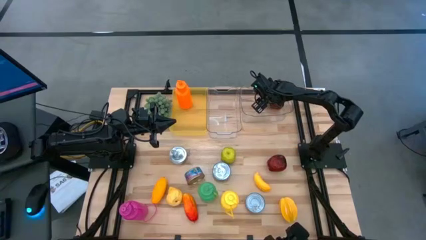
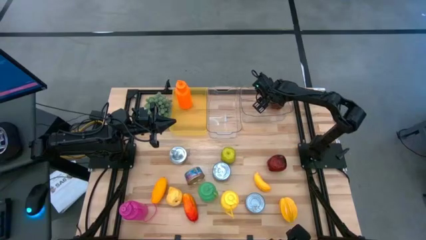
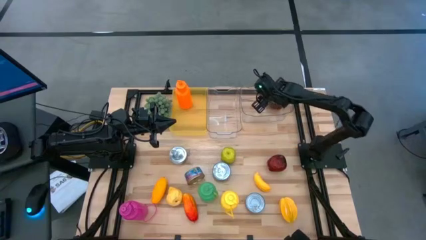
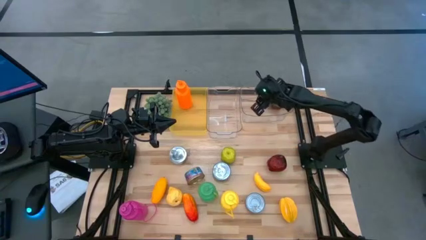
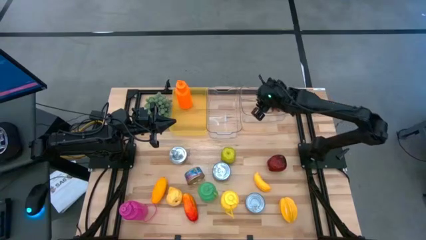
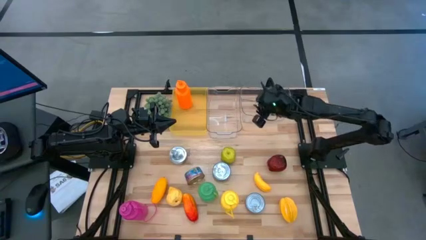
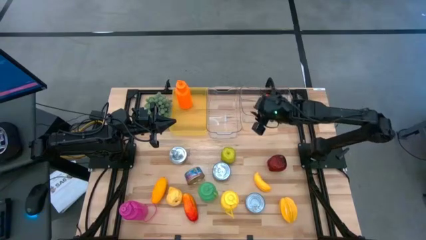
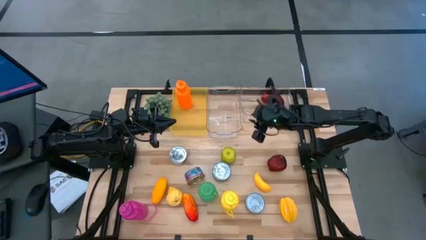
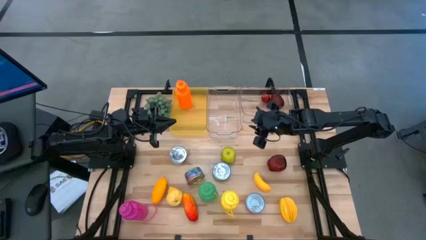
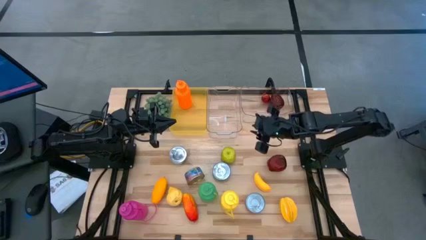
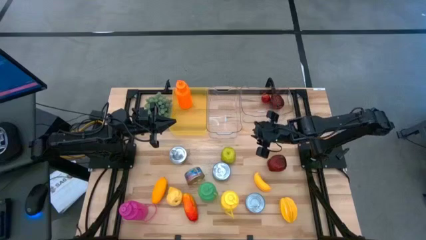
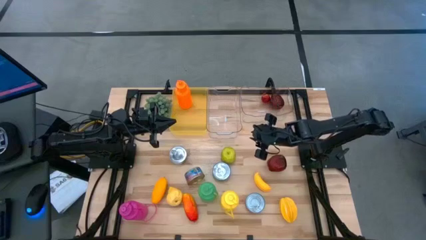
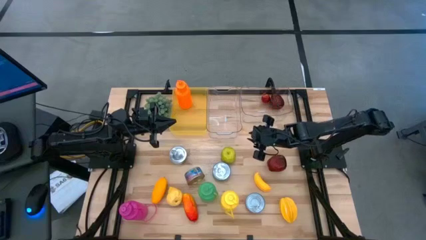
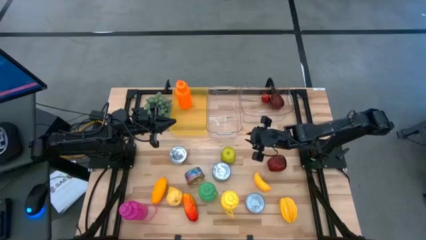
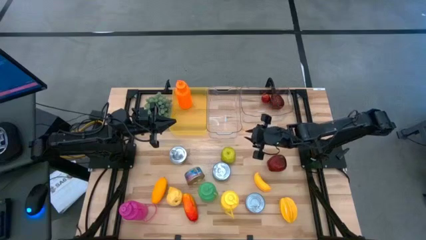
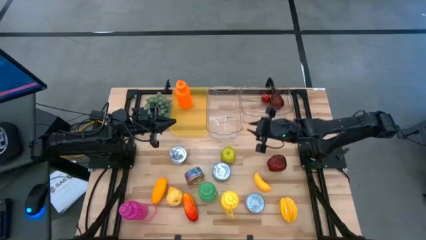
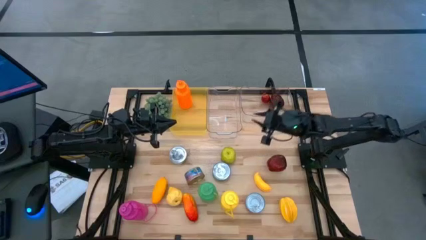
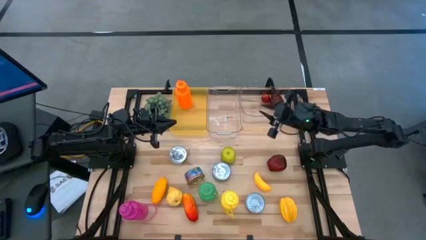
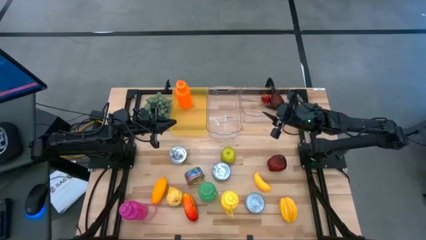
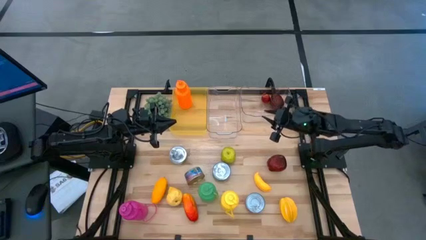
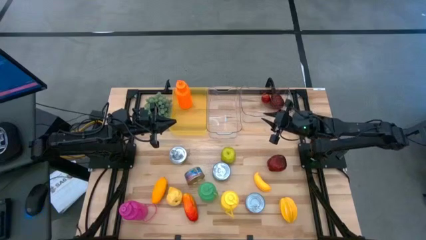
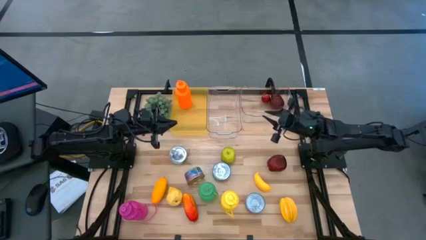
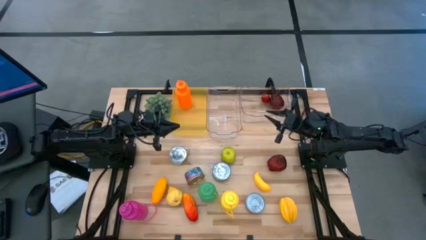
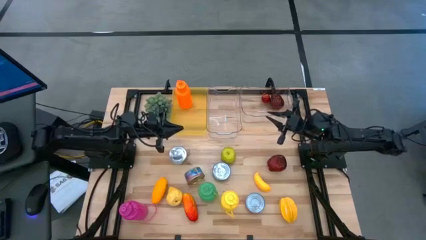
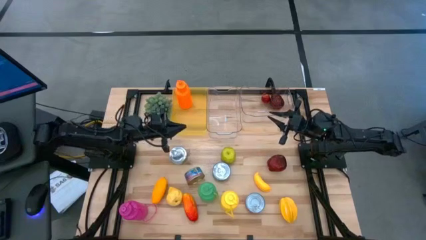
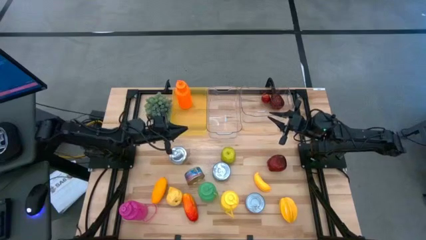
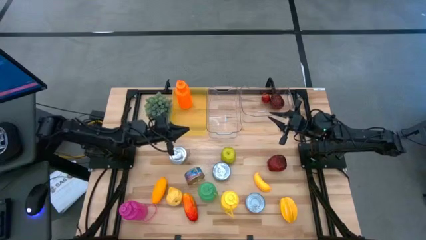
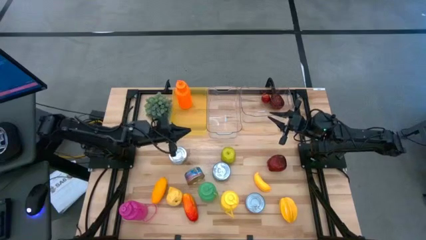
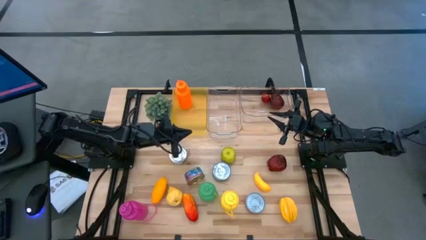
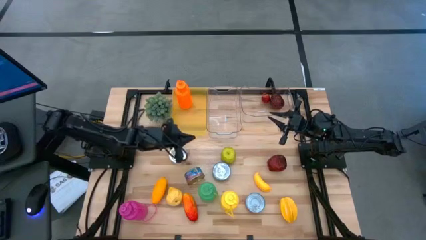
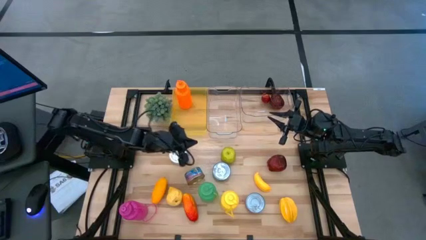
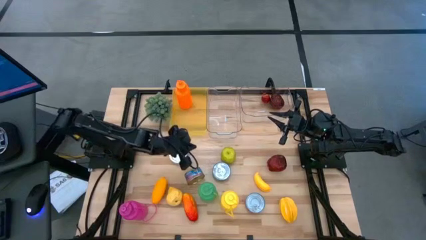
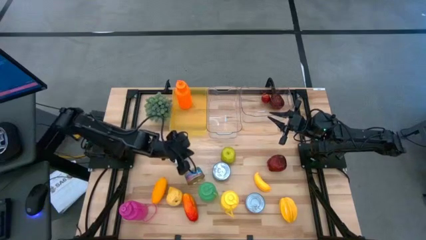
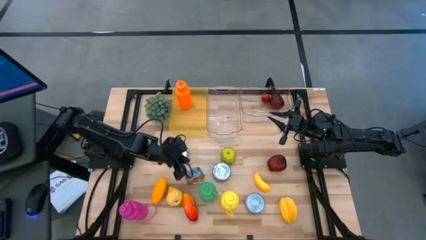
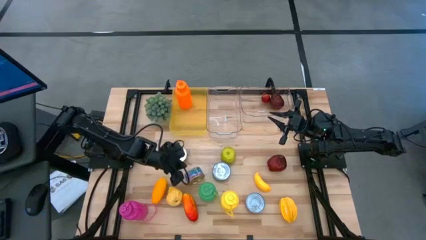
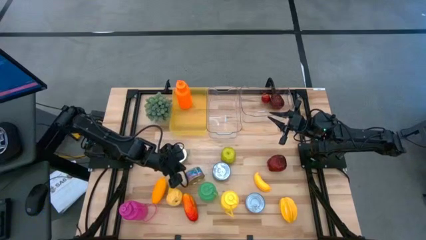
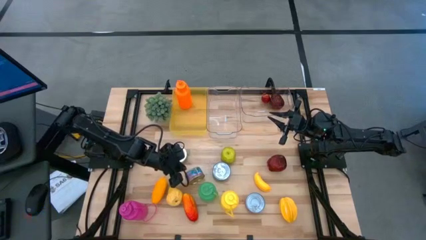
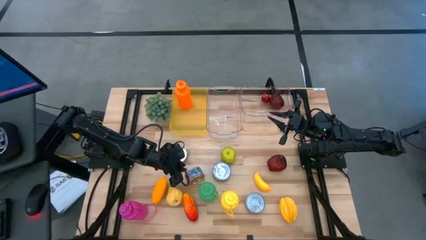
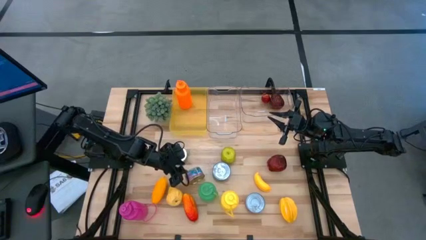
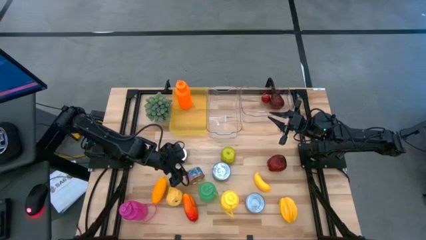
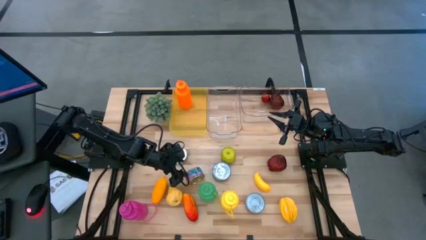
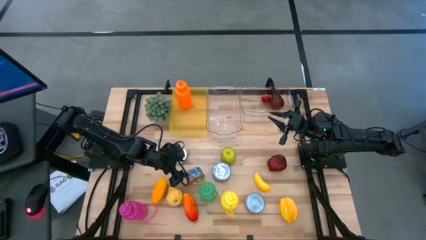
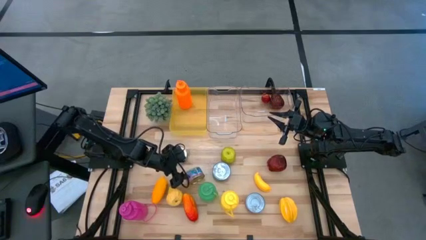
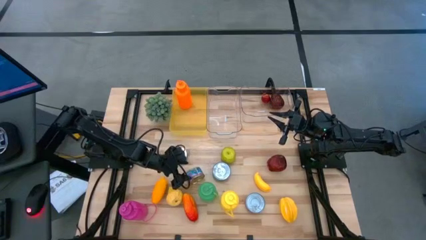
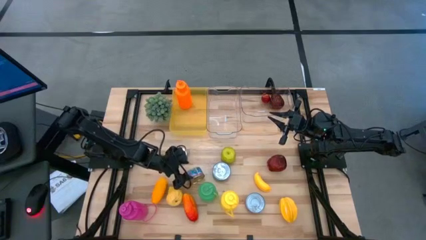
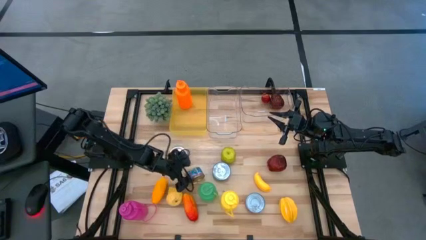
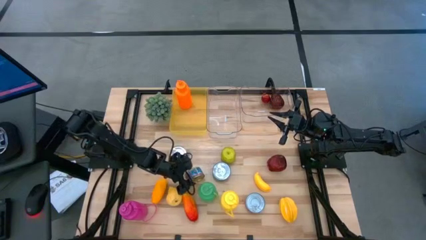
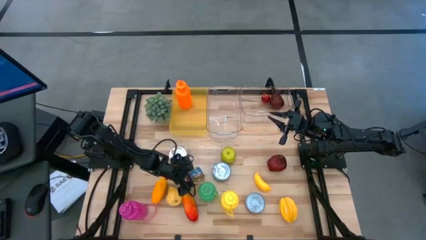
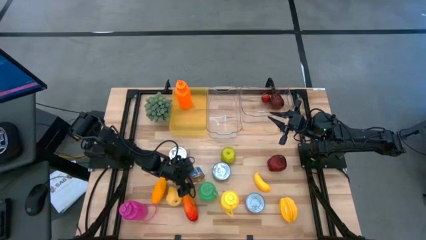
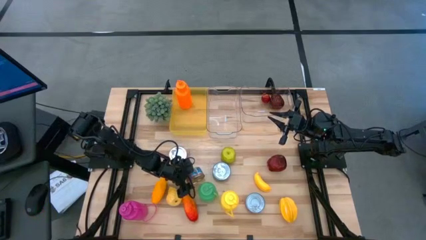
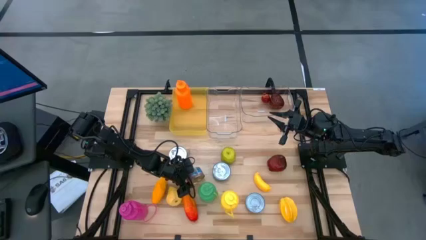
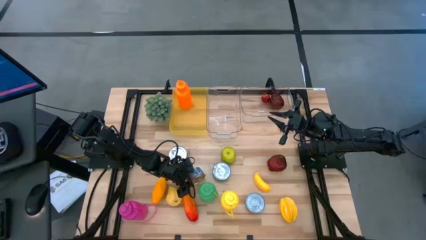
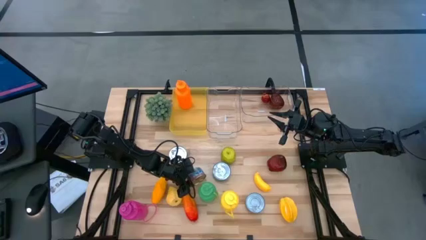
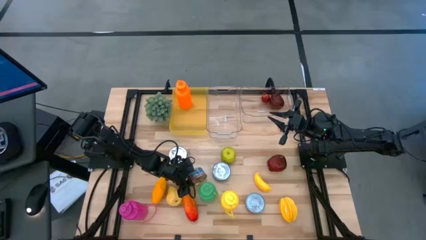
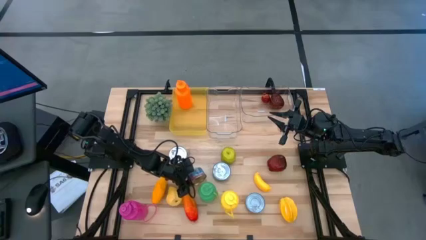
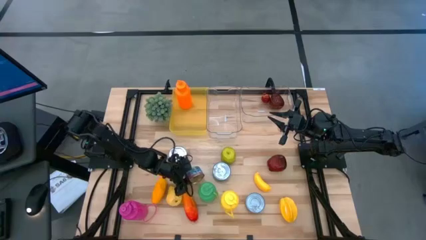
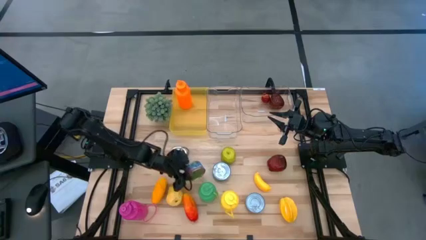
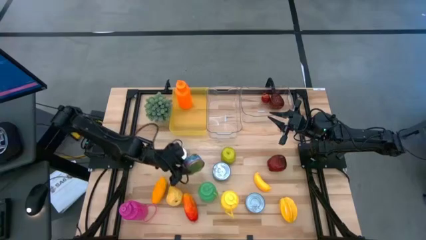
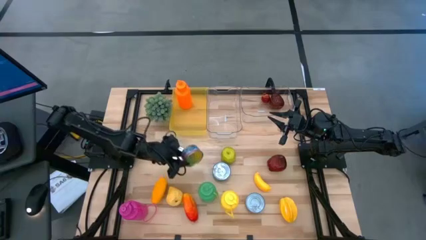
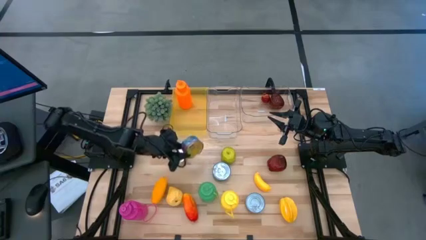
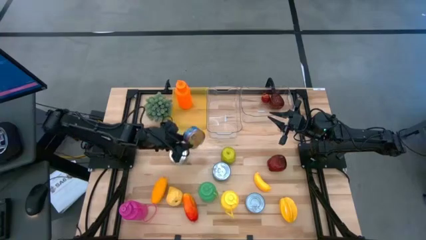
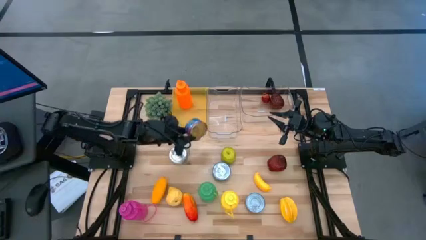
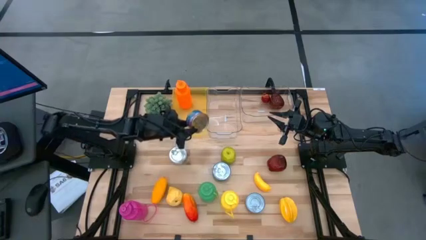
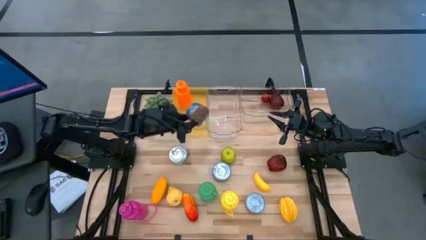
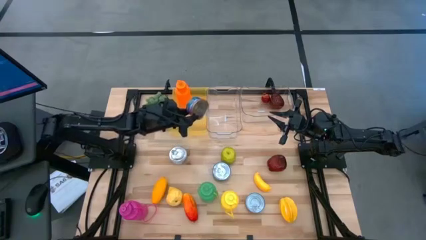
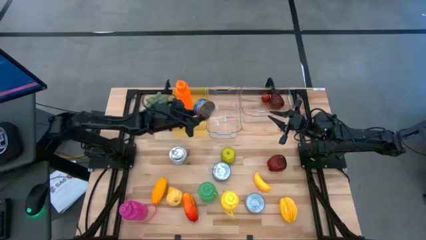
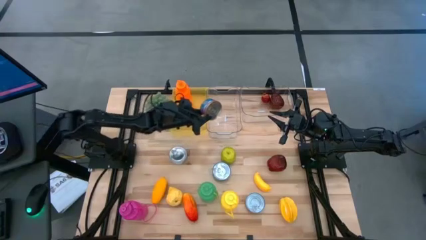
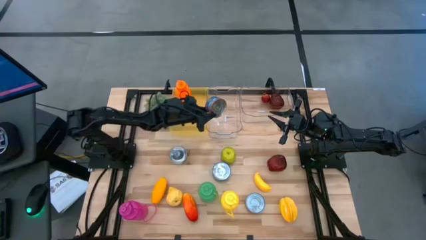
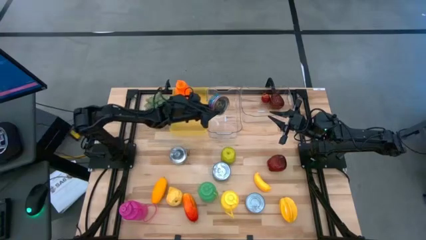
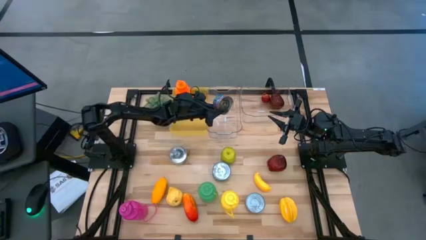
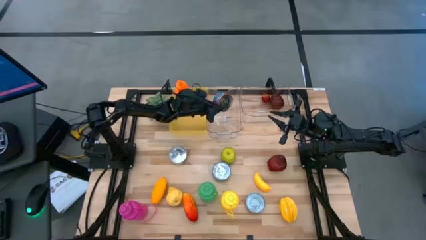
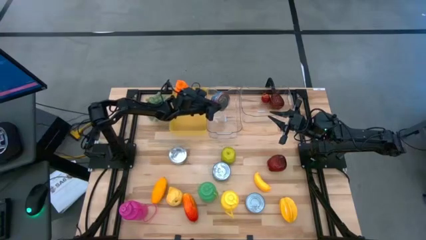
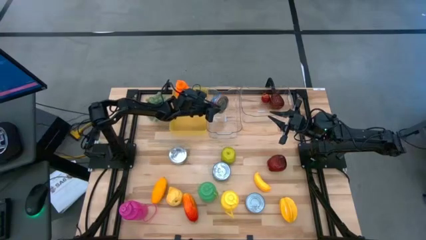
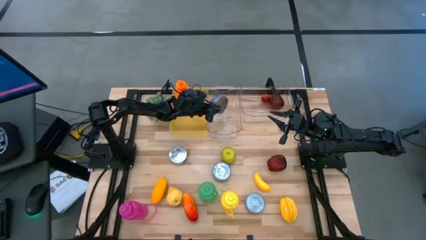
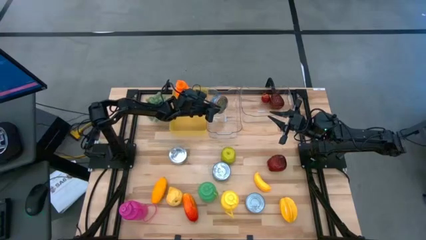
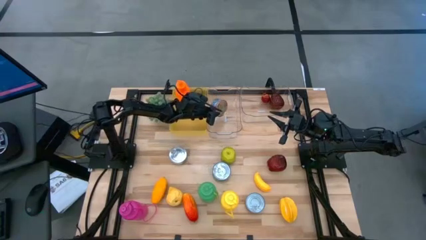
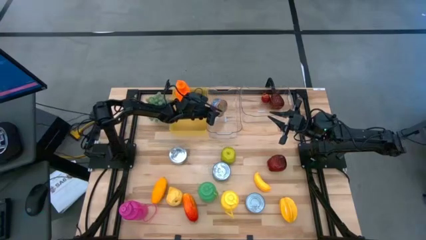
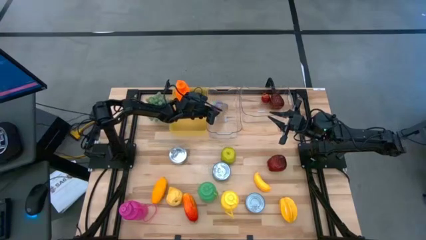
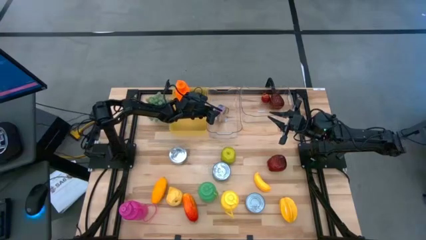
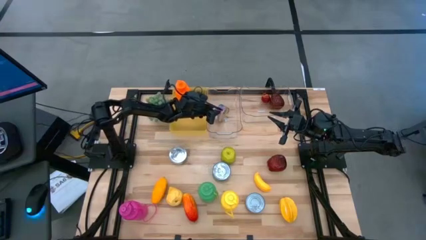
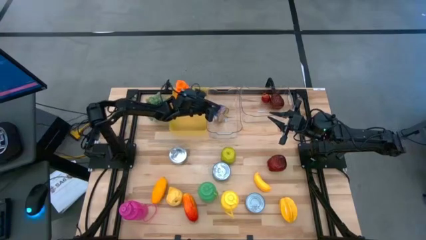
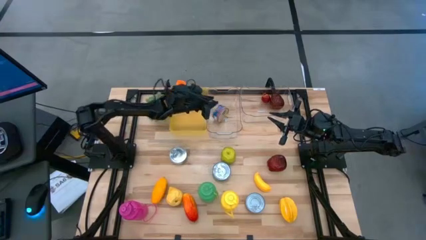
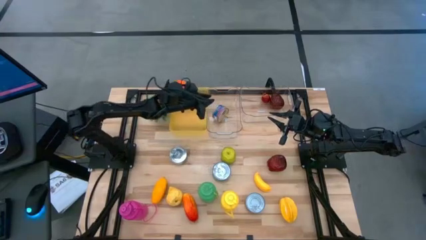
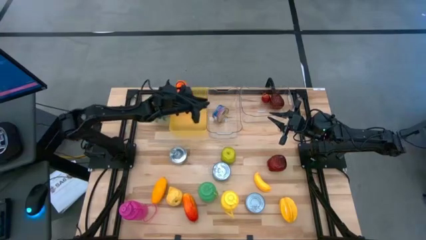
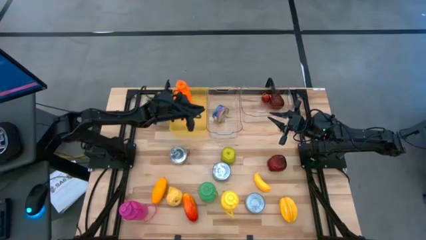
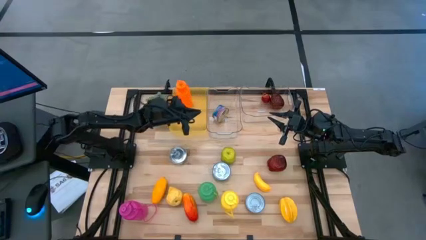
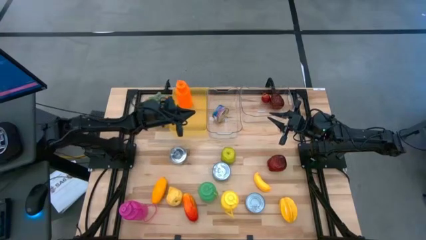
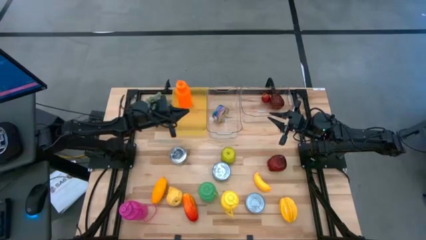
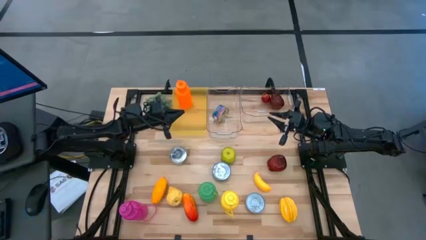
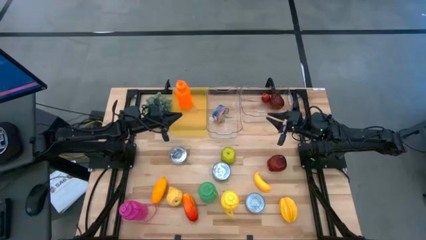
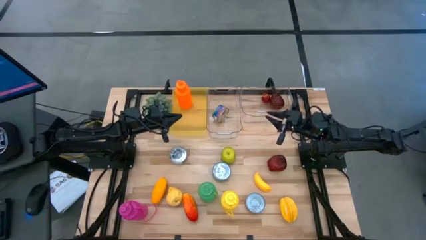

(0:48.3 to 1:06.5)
Task: Pick & Place Food Item
Put the blue tuna can into the left transparent bin
